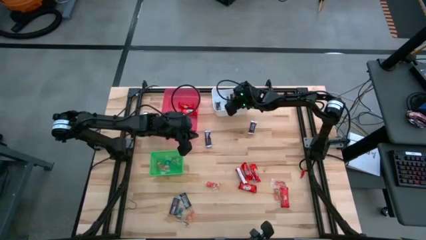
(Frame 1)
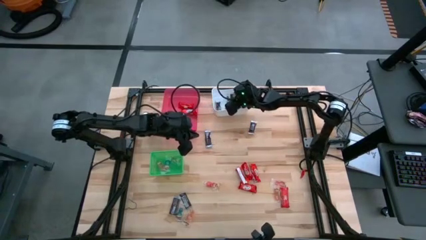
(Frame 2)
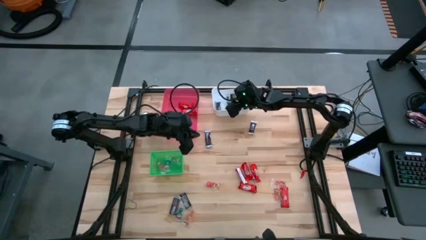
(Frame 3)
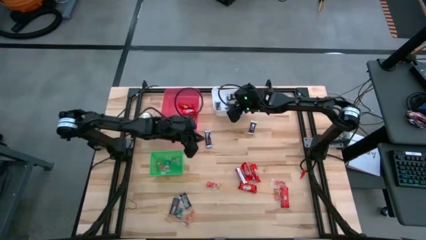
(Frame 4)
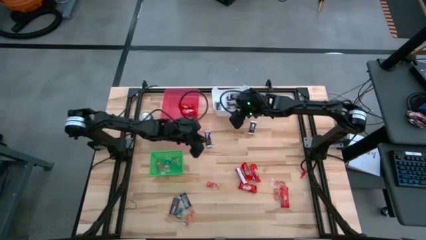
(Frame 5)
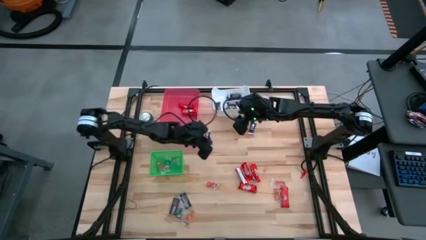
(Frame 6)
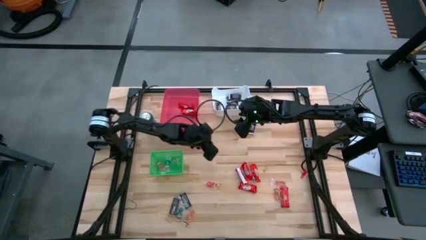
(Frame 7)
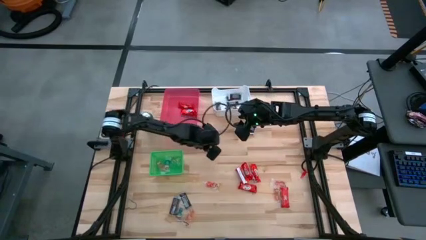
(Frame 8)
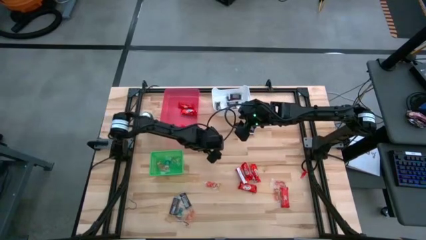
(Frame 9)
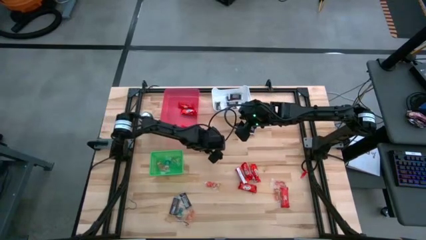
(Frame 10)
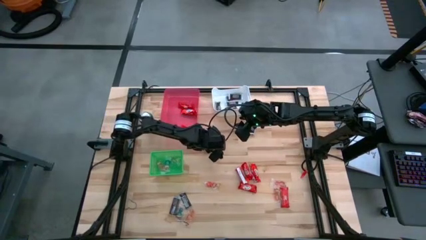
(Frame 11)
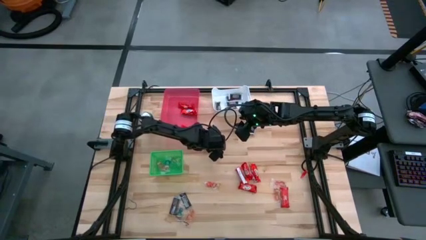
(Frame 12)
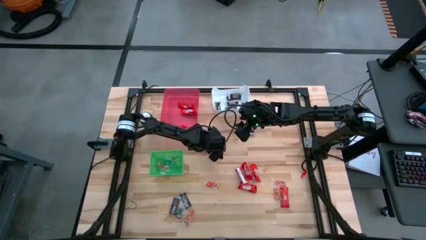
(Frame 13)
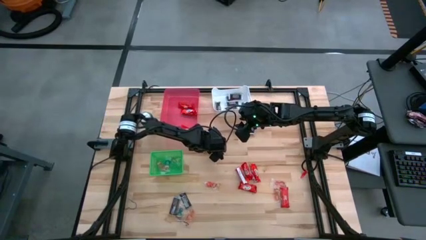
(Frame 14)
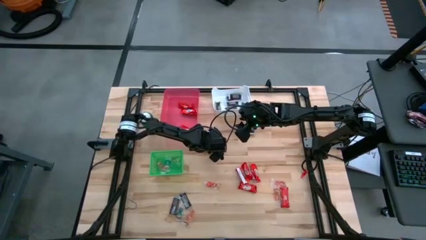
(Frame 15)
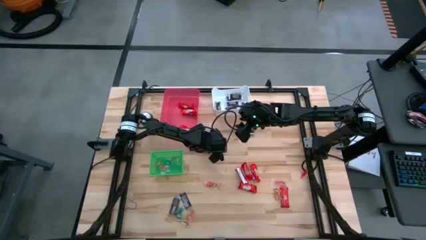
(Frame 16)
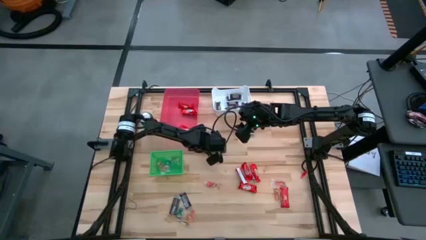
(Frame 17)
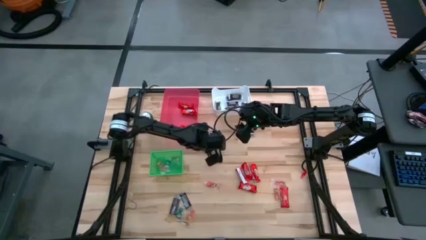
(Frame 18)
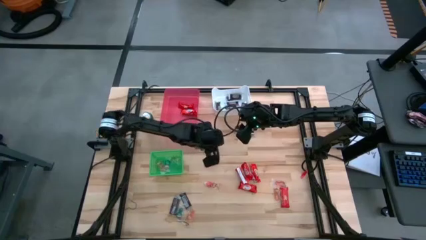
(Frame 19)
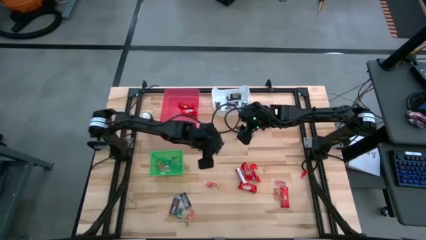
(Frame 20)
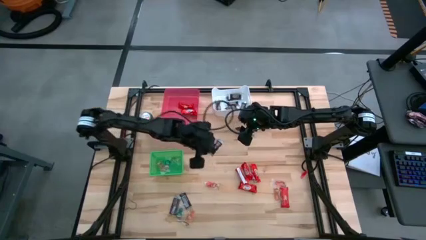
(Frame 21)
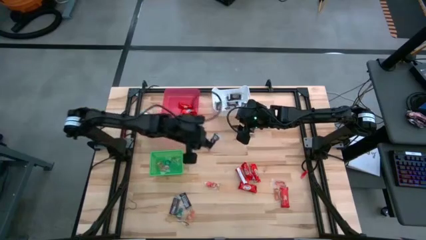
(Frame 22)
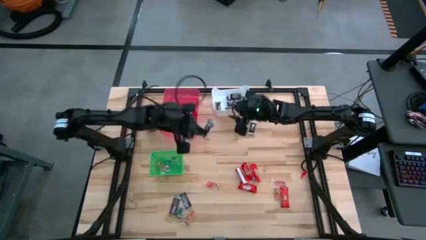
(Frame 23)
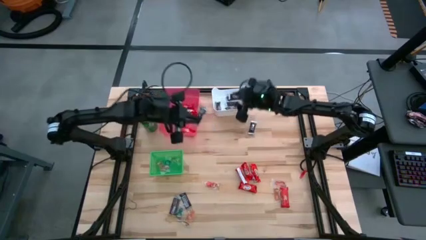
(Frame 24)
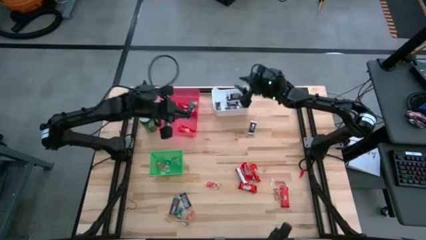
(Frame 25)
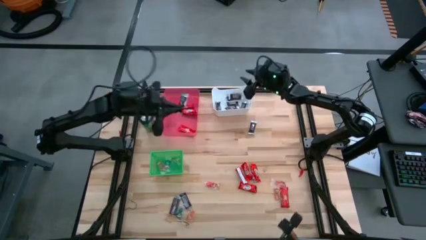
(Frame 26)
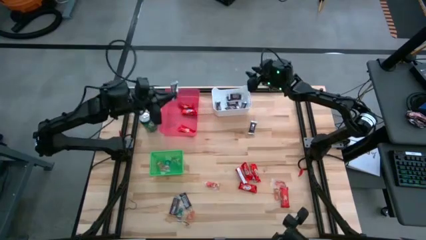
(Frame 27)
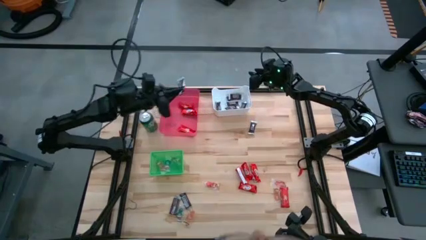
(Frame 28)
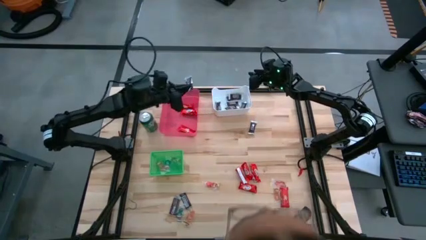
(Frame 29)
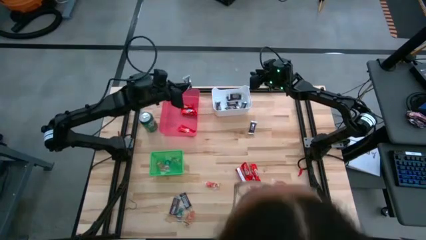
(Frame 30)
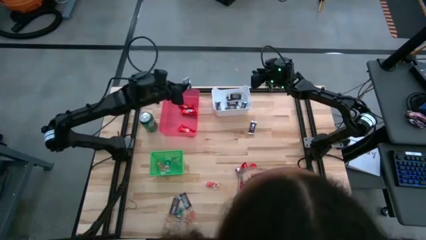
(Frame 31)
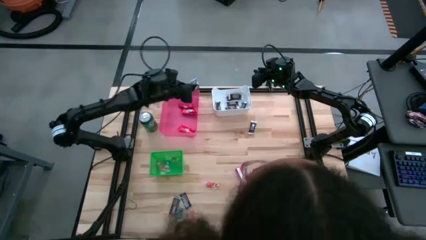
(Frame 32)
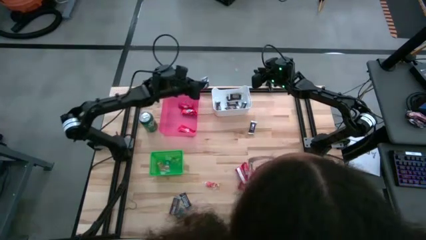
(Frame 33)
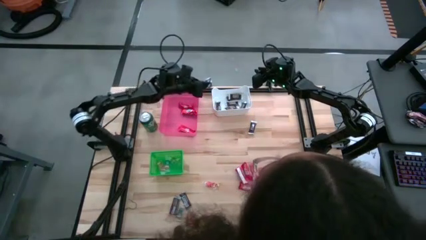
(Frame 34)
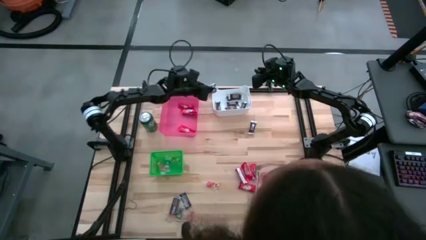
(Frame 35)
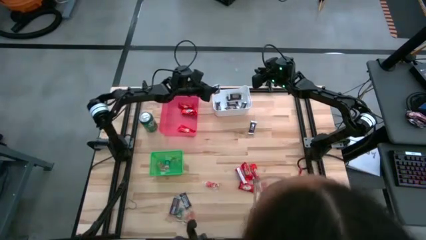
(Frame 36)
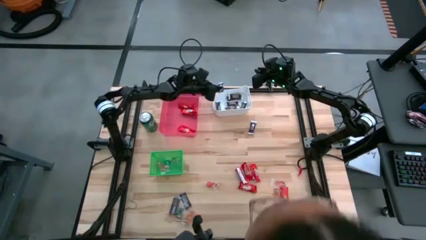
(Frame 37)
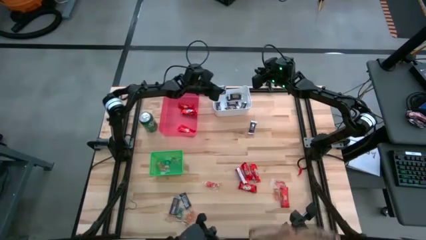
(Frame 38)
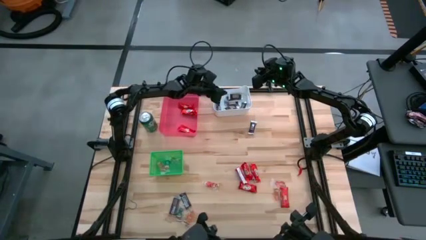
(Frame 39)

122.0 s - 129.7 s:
Task: Organize candy in baskets
Put the brown chocolate into the white bin

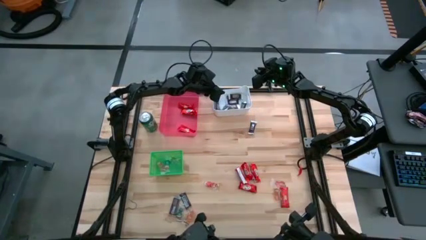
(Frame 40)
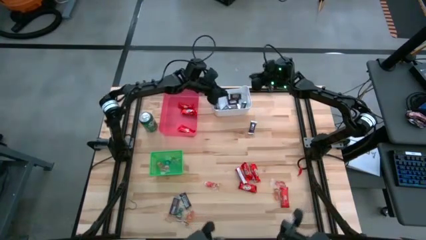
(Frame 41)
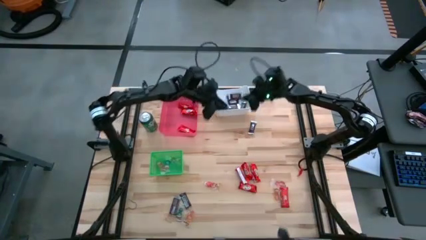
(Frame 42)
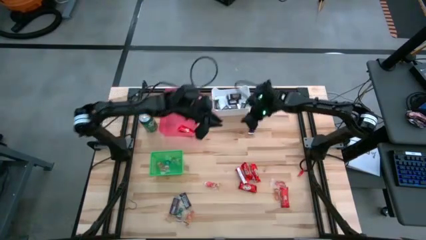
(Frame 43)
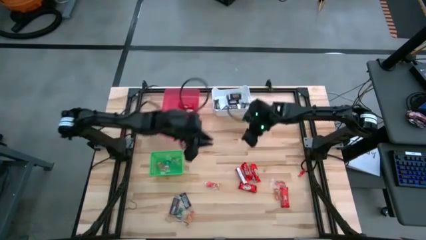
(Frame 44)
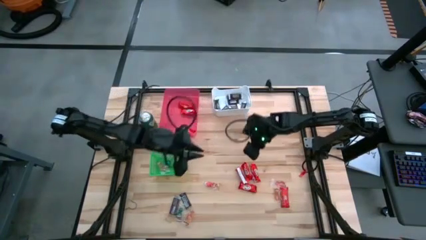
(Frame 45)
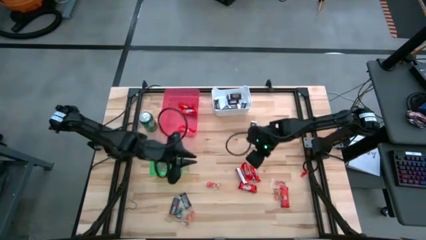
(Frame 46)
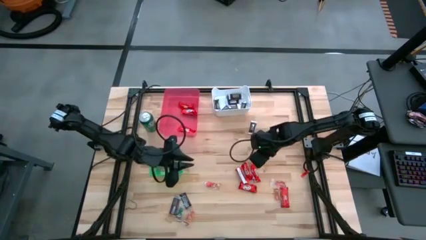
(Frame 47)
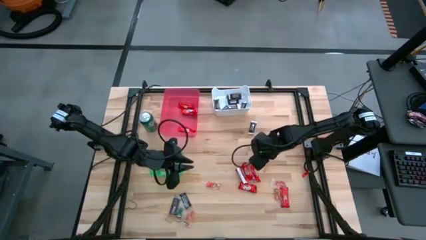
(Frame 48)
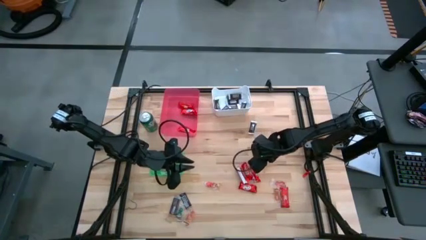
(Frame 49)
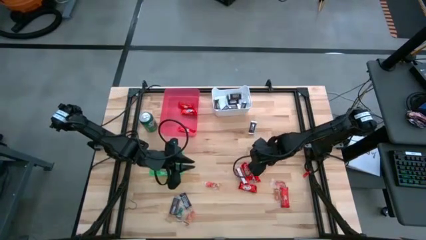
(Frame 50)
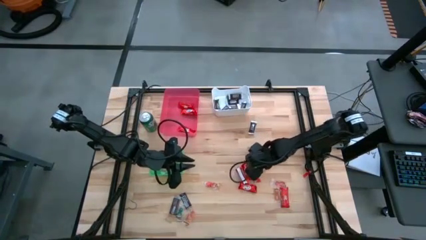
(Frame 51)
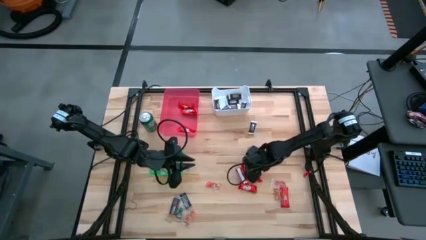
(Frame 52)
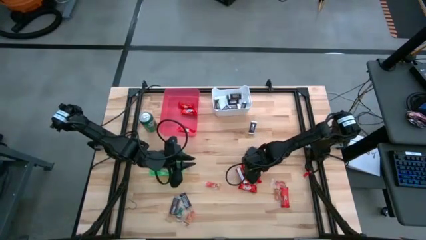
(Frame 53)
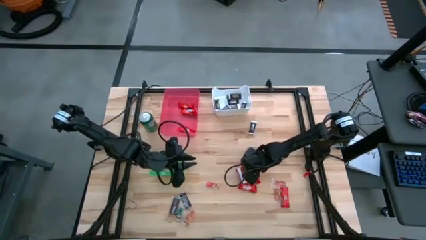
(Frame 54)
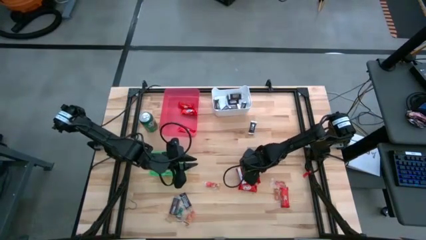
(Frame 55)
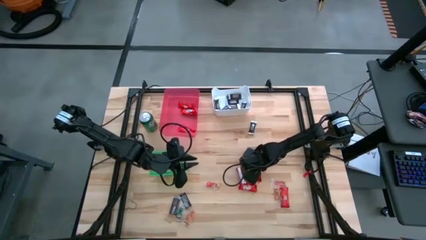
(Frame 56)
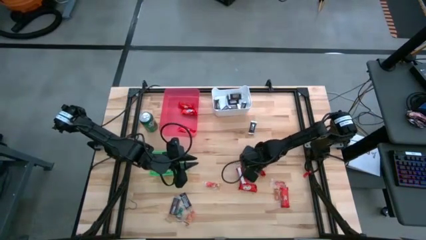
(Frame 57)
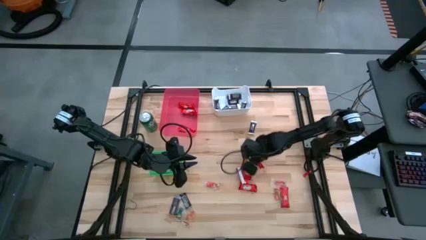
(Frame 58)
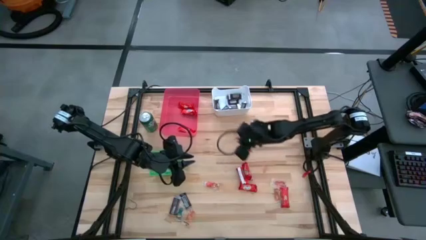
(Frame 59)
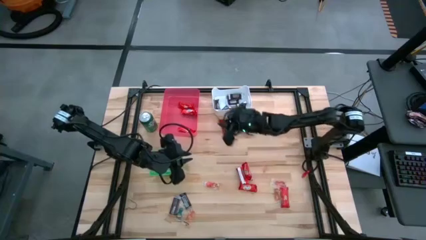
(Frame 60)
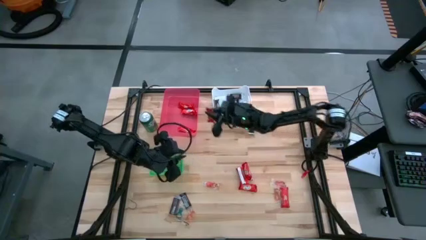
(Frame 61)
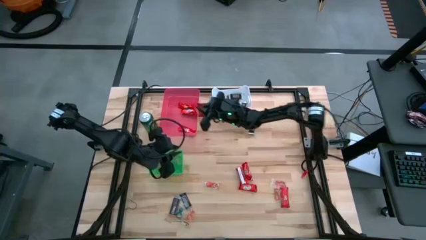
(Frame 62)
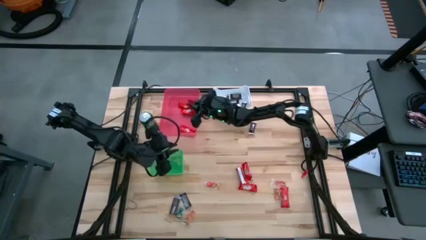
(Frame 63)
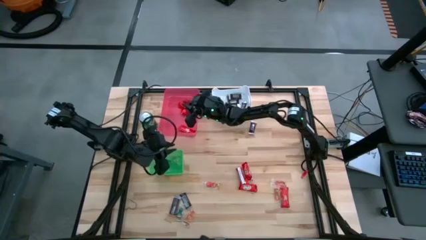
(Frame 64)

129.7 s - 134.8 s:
Put the red chocolate into the pink bin
